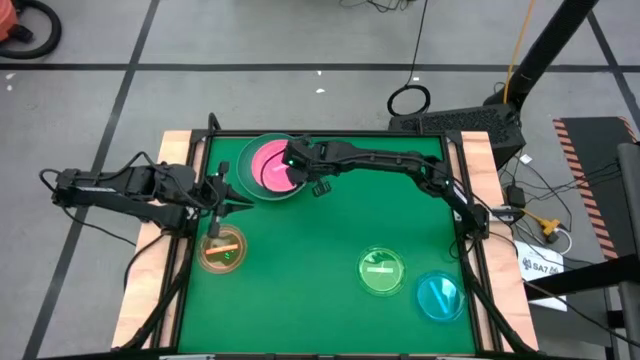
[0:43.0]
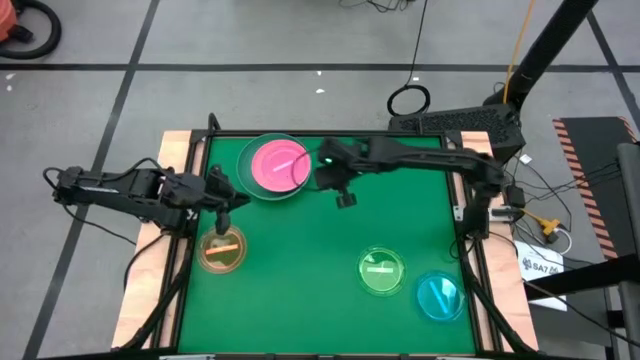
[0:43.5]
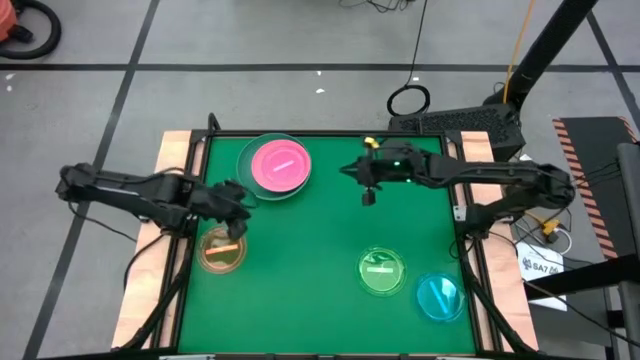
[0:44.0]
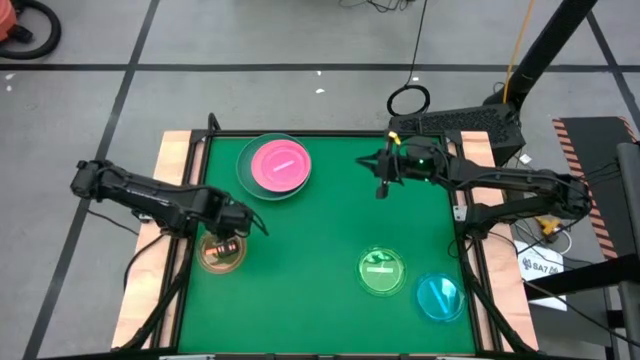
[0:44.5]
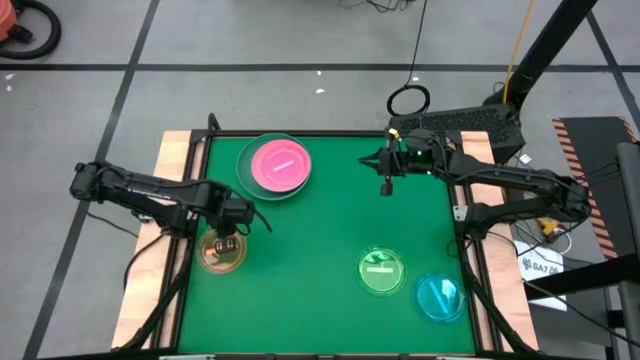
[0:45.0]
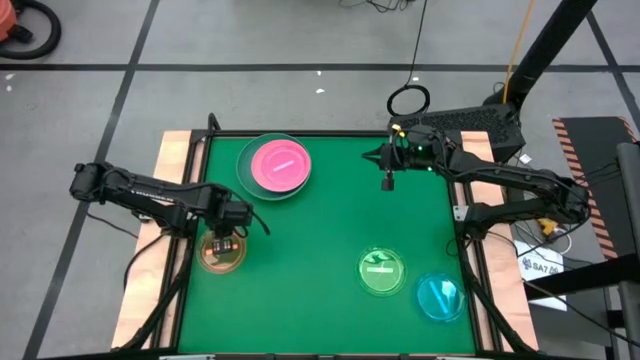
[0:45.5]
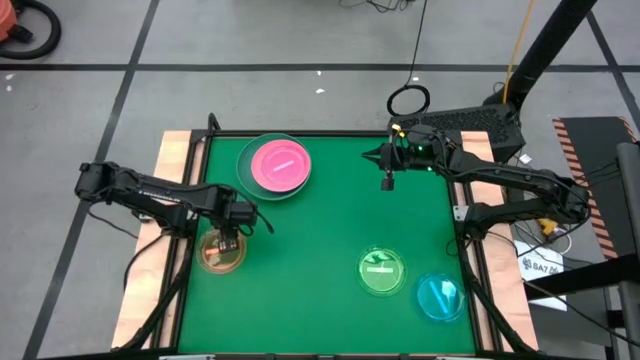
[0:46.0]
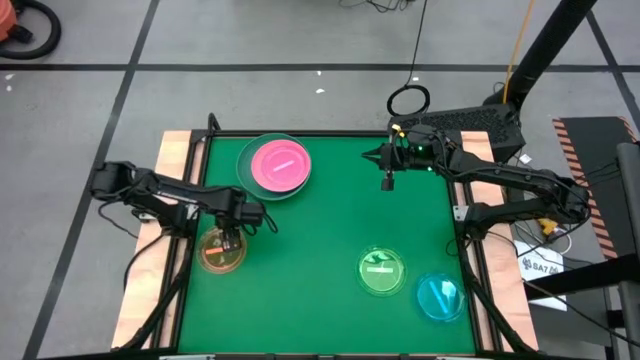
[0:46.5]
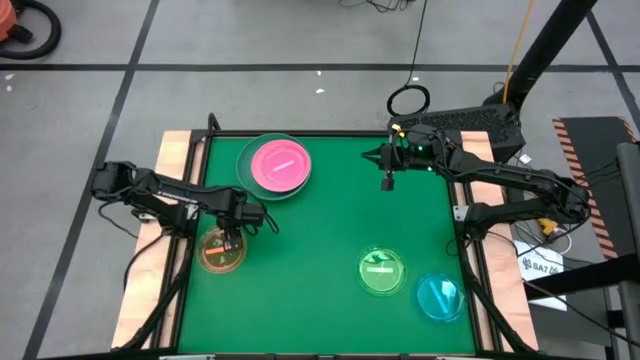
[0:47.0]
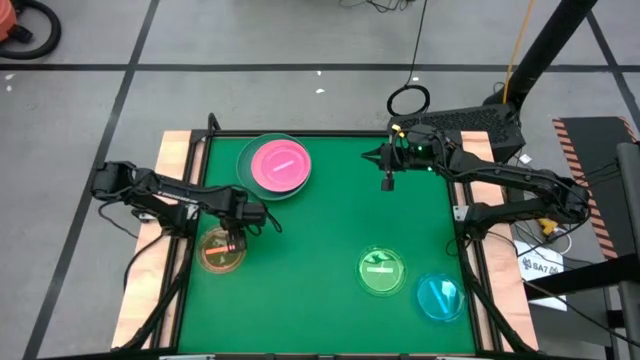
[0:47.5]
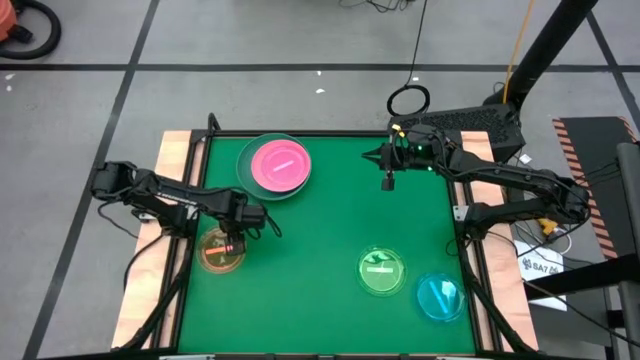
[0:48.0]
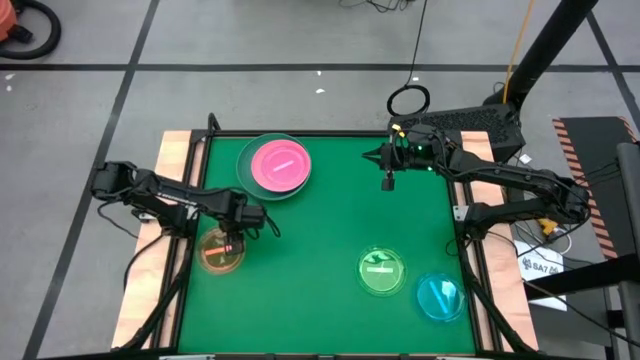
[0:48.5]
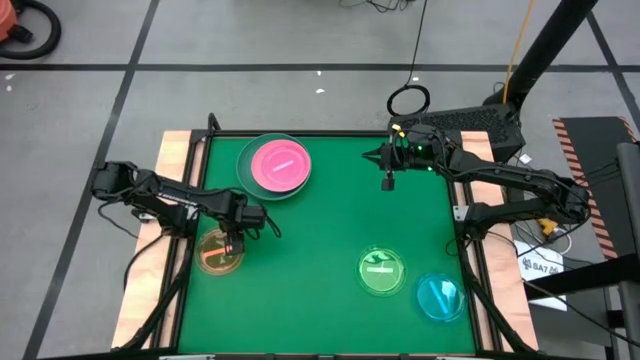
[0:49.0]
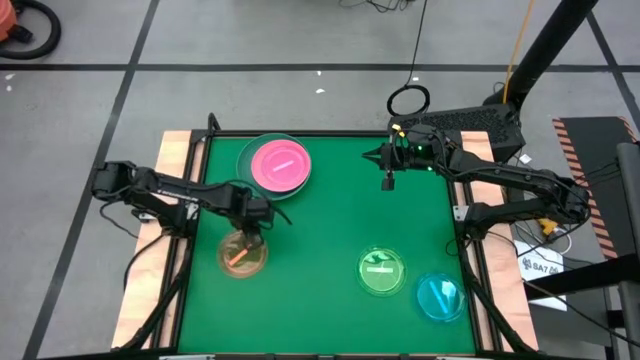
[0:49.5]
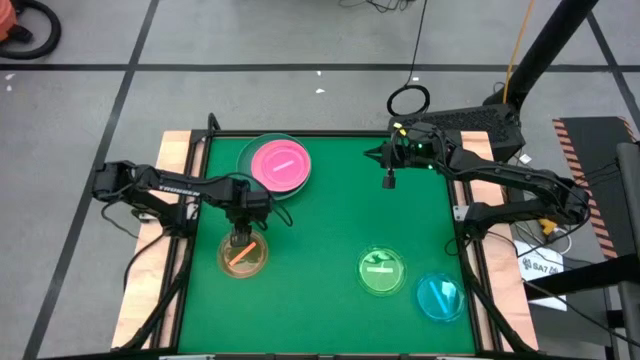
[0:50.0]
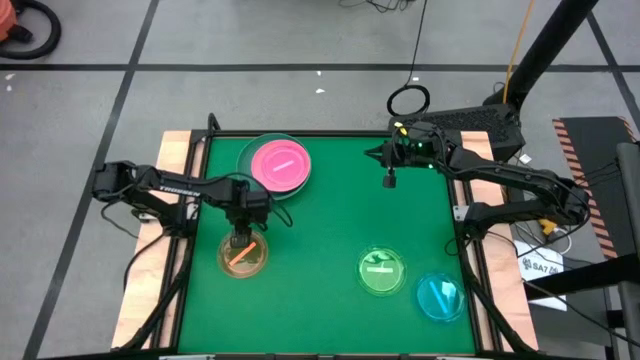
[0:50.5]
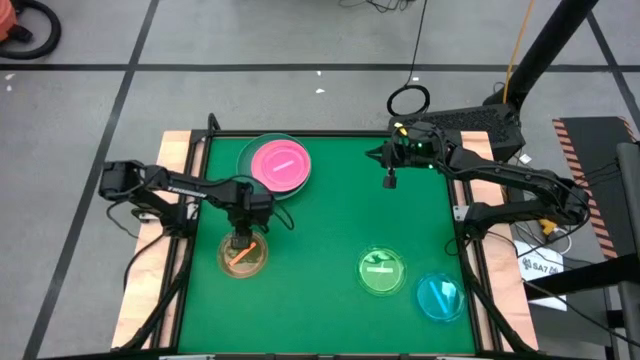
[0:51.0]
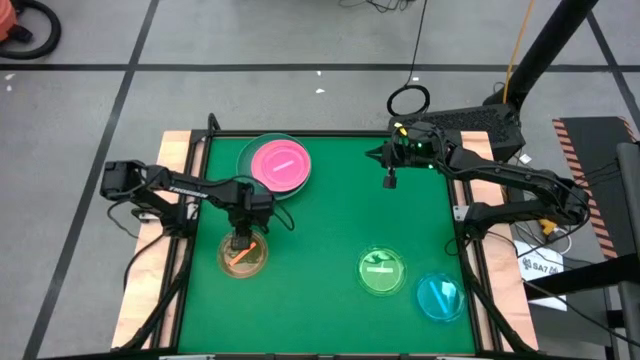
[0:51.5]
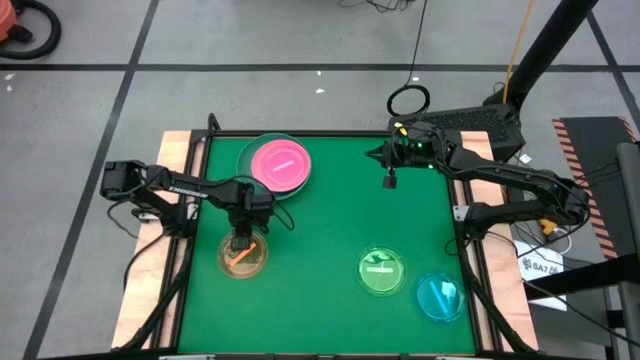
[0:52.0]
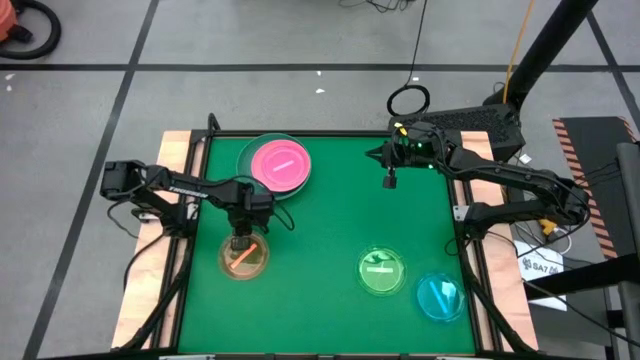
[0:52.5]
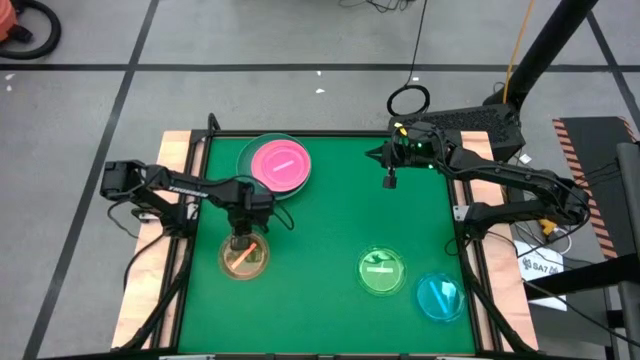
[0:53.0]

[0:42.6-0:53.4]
Task: Stack plastic plates
Stack the orange plate on top of the pink plate

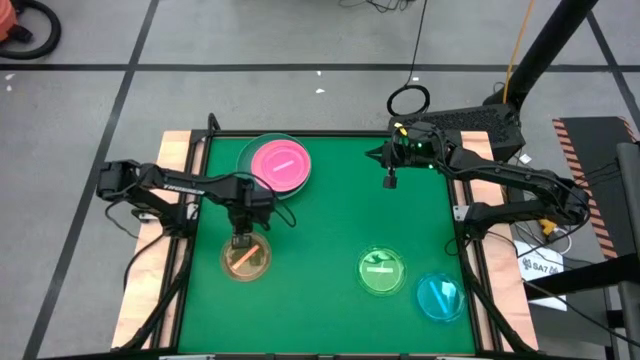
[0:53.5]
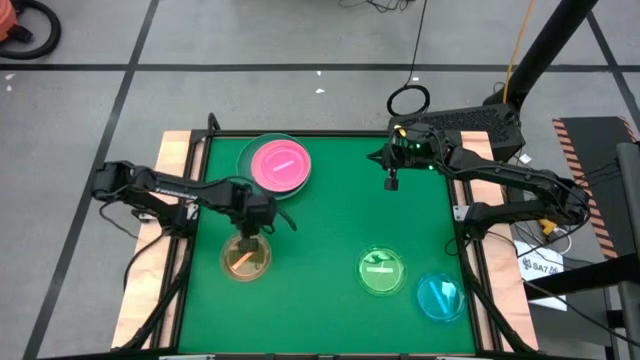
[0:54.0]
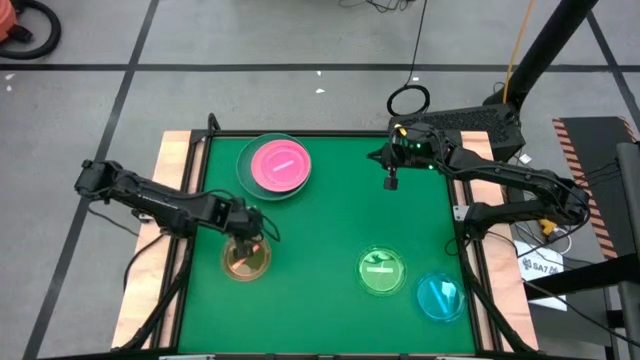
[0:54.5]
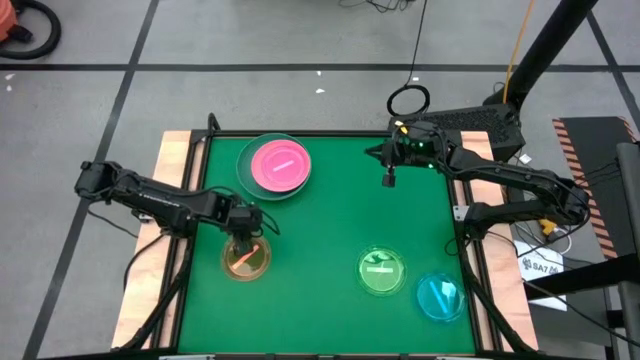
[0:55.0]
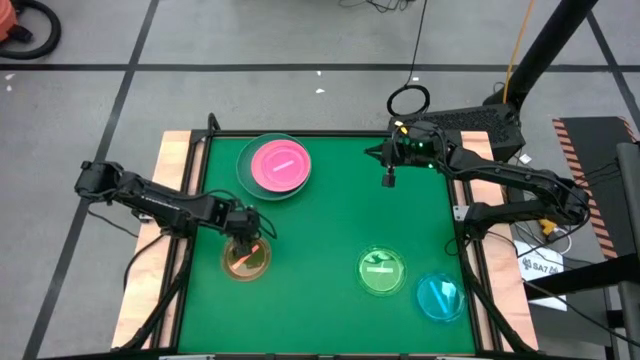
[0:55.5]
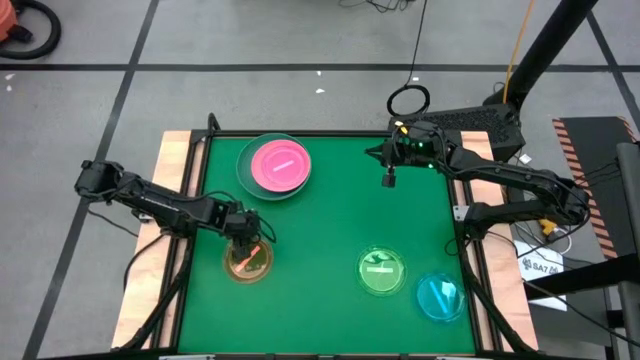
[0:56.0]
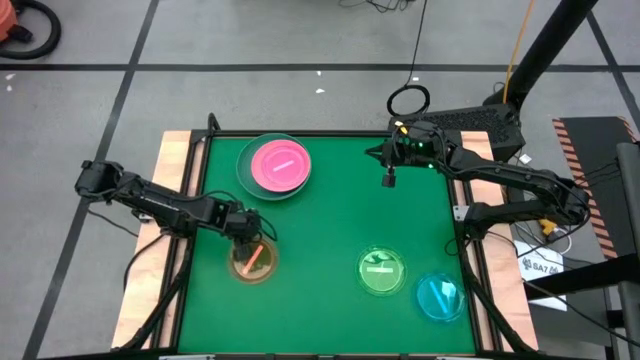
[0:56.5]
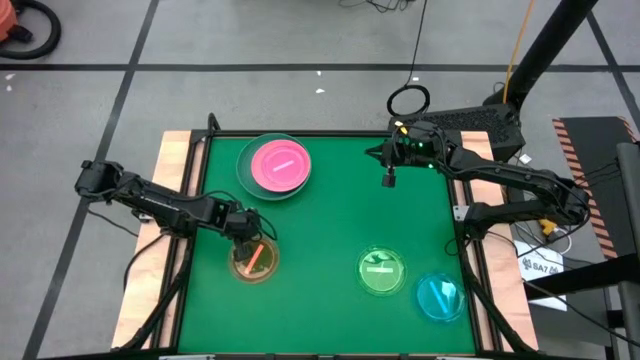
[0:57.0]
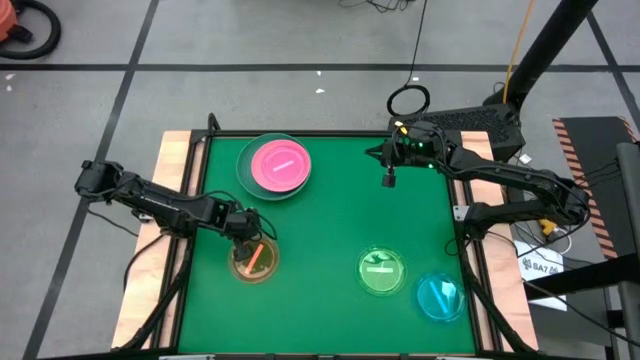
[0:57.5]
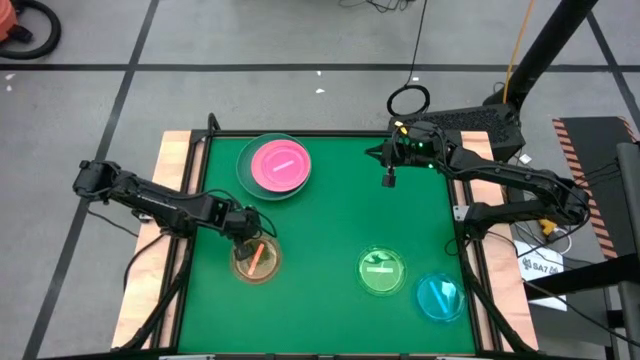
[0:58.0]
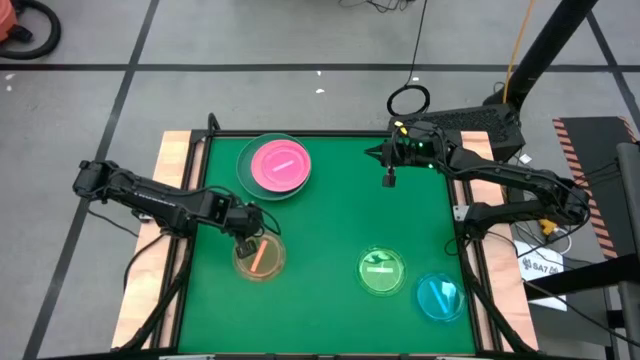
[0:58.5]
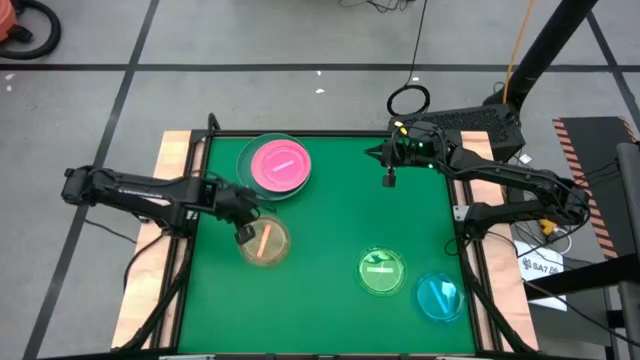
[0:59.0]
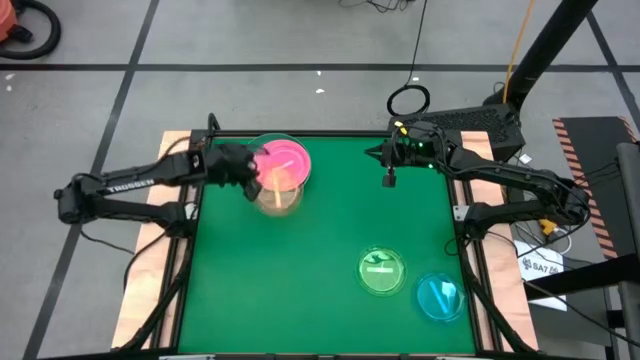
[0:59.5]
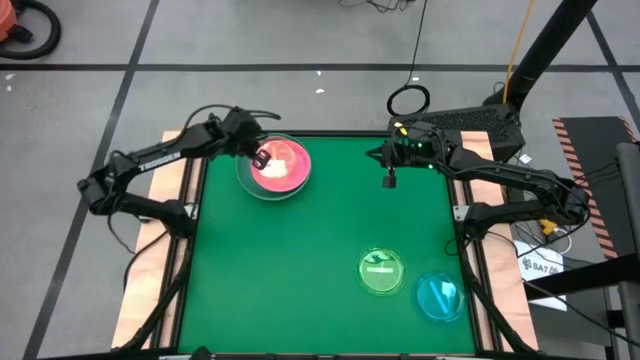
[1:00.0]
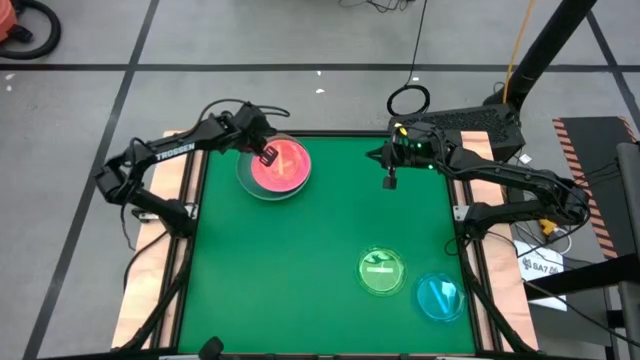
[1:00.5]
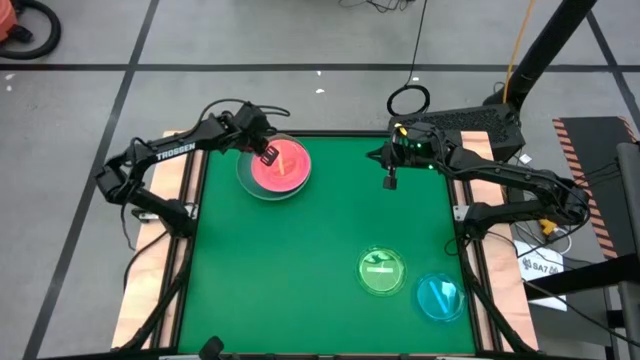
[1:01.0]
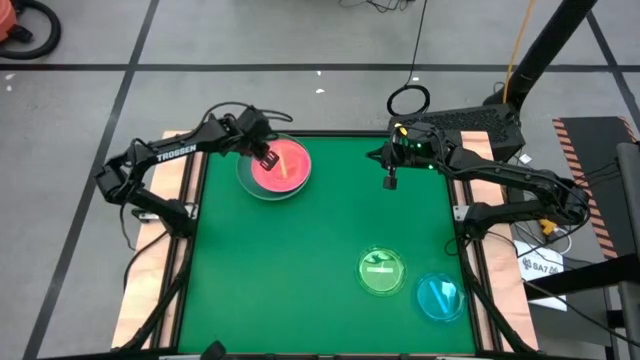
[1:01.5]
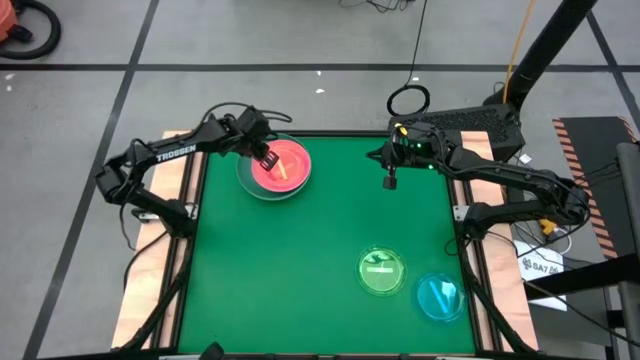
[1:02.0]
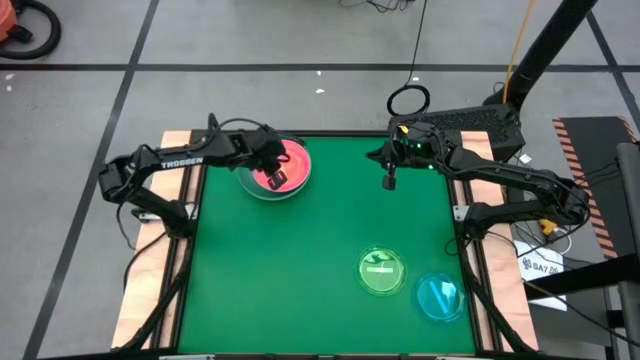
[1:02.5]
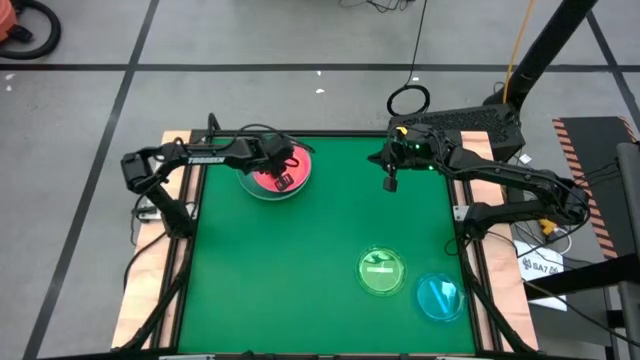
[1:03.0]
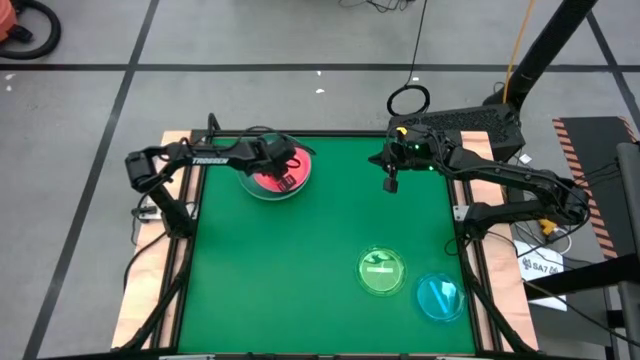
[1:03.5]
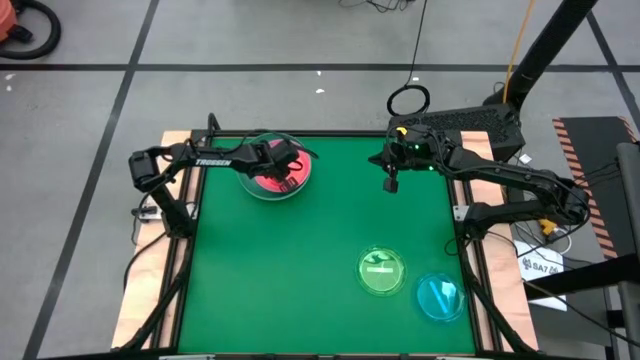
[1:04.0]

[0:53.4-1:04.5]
Stack the orange plate on top of the pink plate

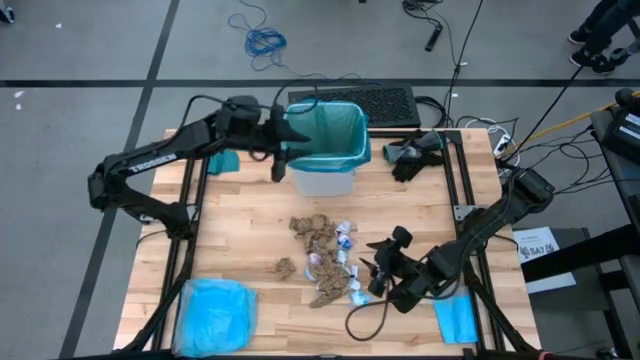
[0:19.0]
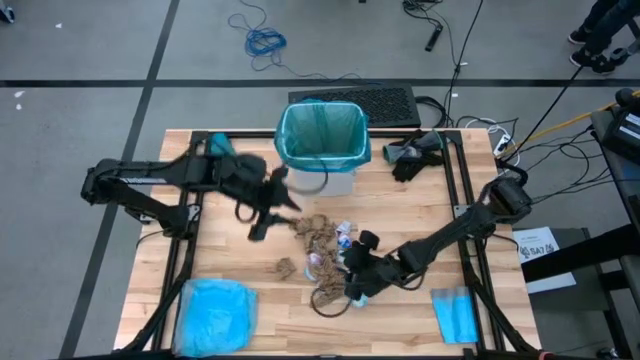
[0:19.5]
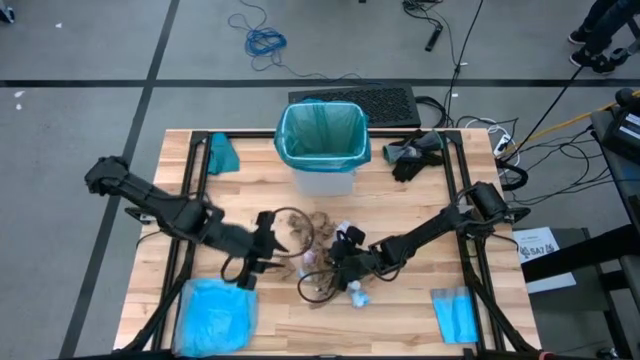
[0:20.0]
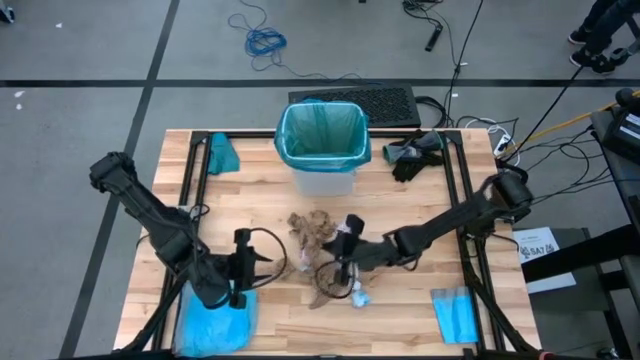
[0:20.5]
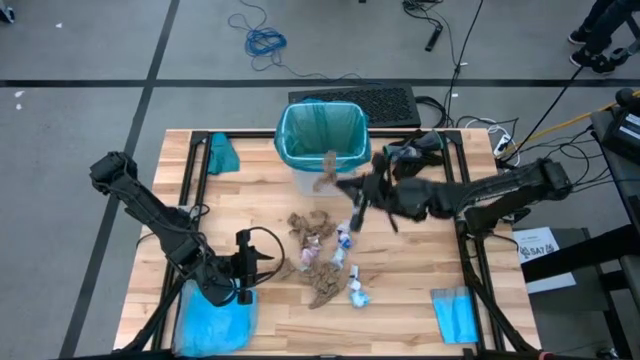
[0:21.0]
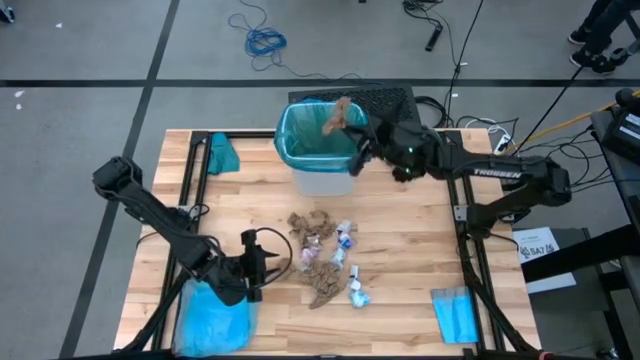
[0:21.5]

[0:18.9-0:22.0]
Task: place trash/remove bag and relplace
Put the brown napkin into the trash bin
